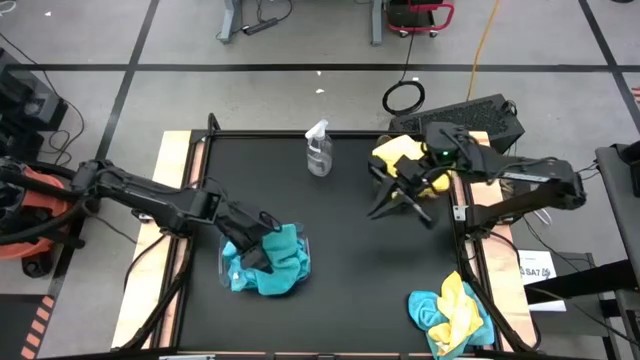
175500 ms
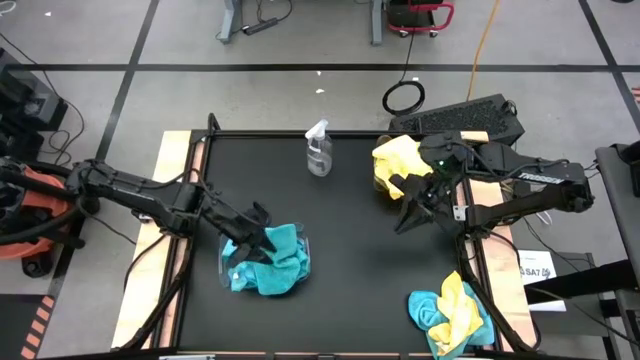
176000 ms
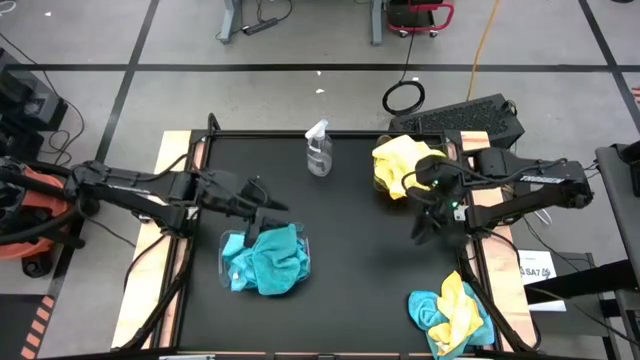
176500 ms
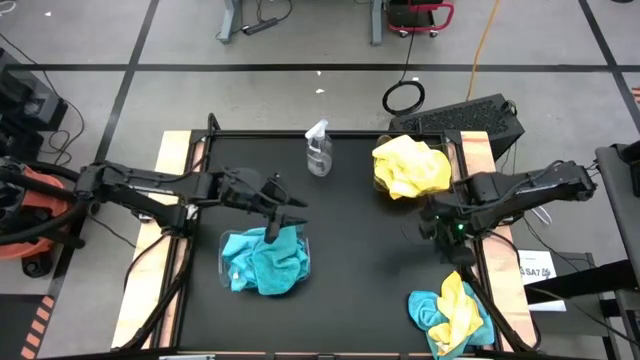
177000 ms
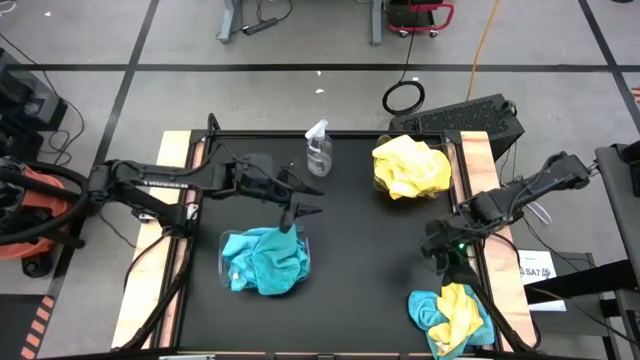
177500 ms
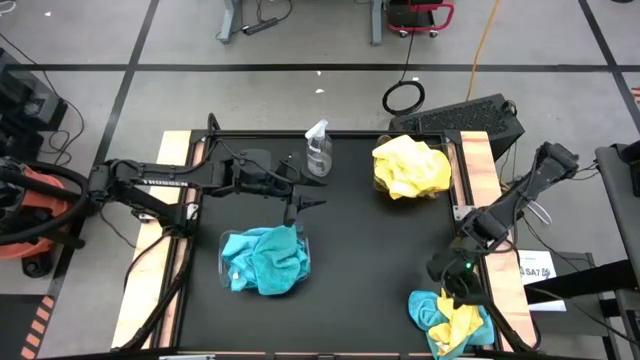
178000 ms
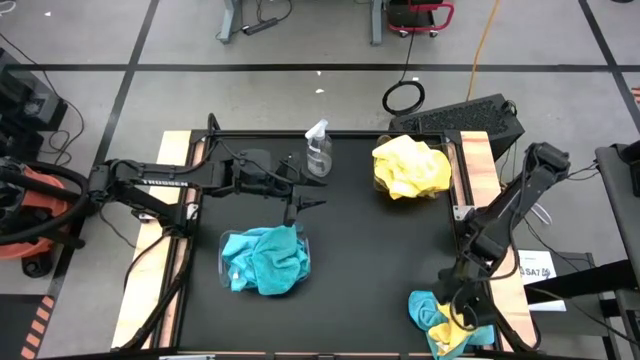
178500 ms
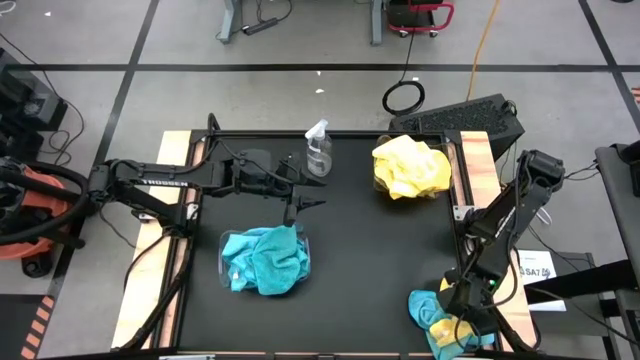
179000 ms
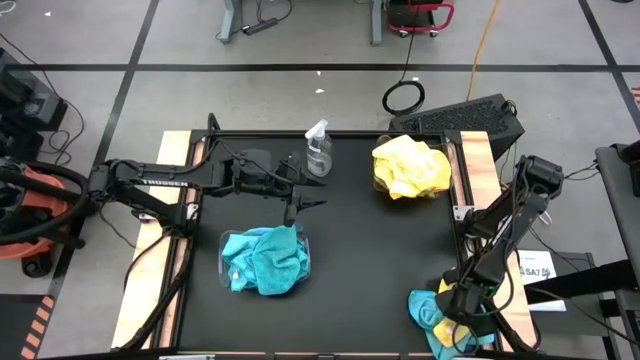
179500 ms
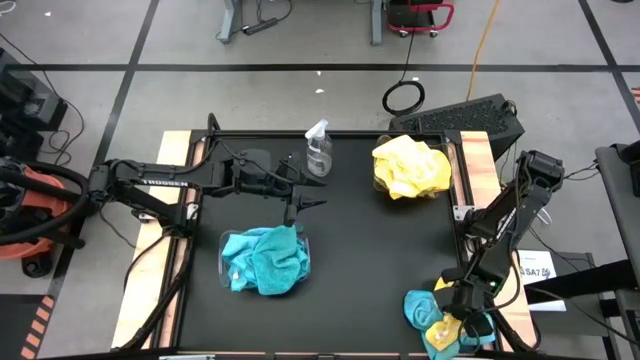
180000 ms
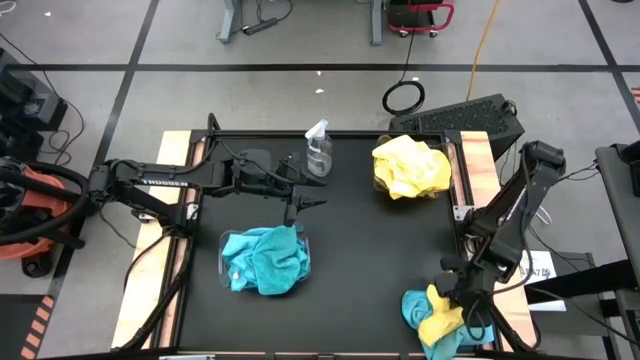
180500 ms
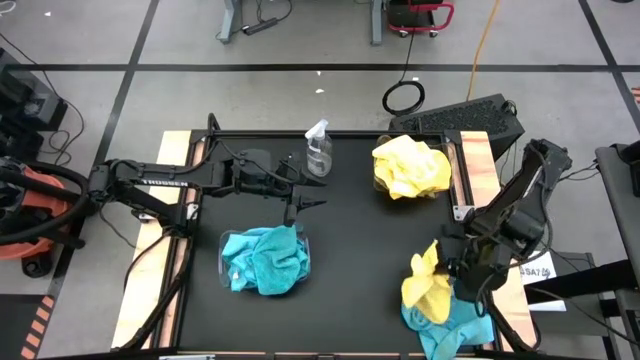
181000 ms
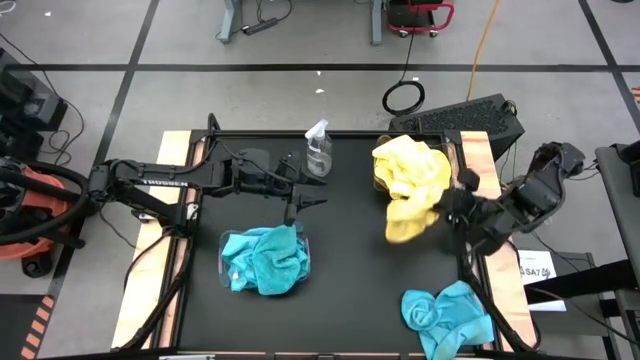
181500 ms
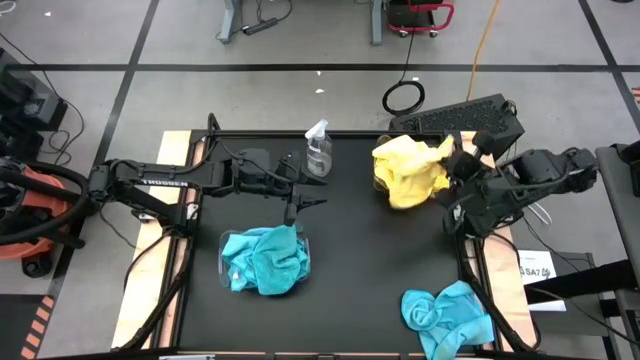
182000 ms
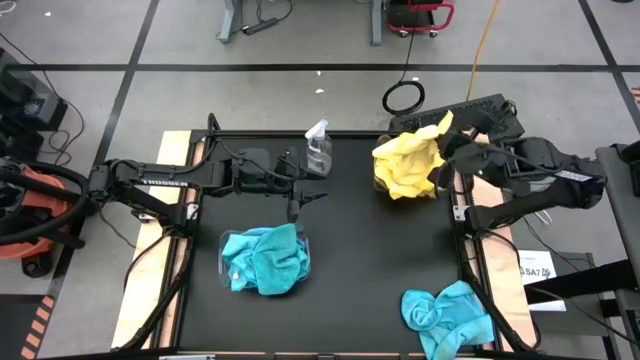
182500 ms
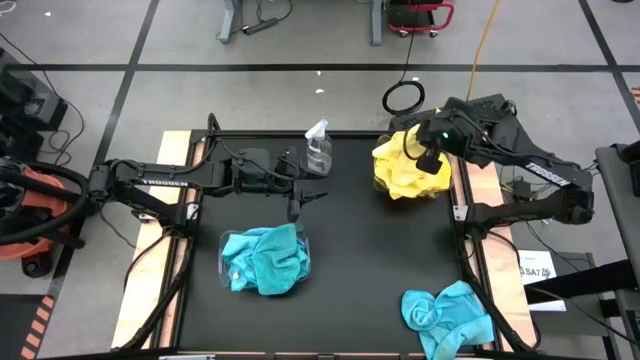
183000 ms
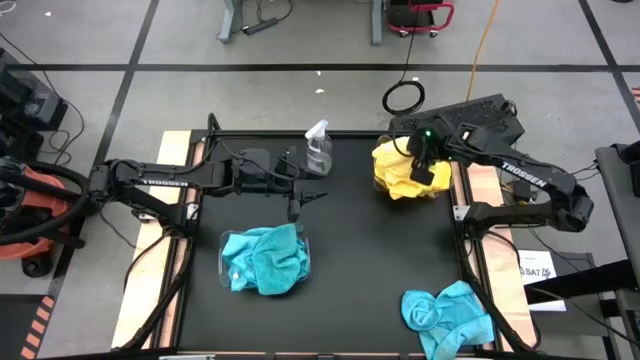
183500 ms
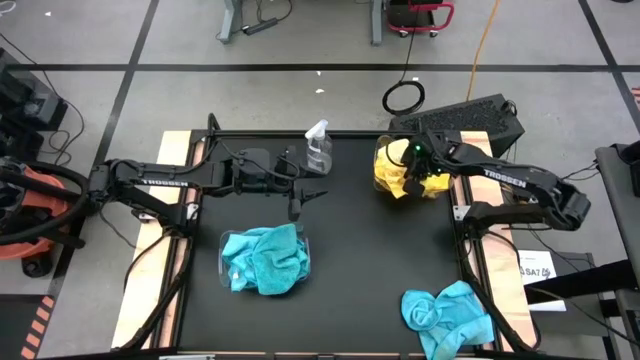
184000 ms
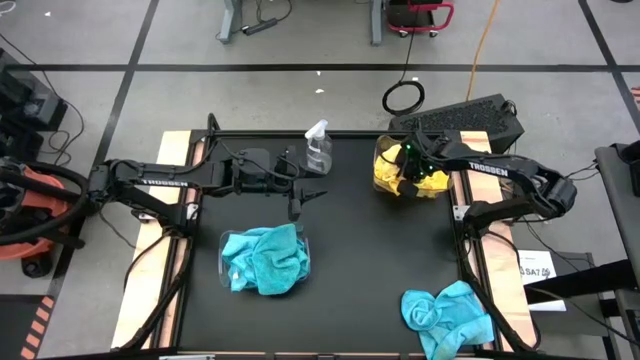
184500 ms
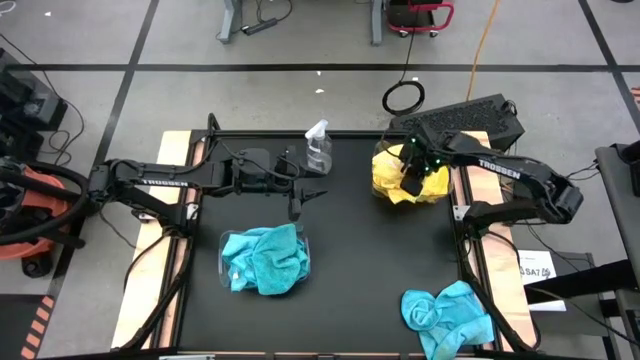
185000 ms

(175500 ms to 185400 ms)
Task: Sort microfiber towel by color & place in baskets
Put the yellow towel into the top transparent bin

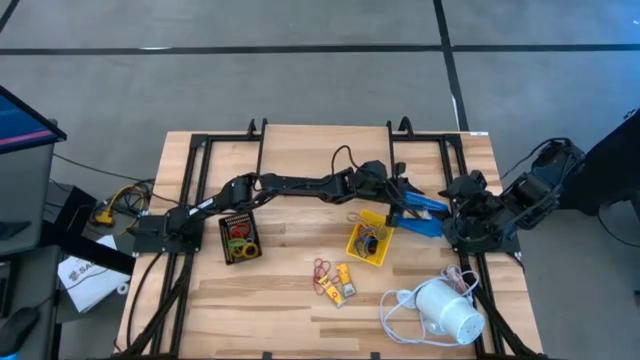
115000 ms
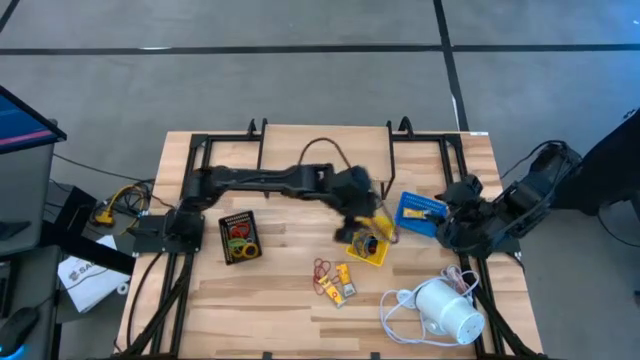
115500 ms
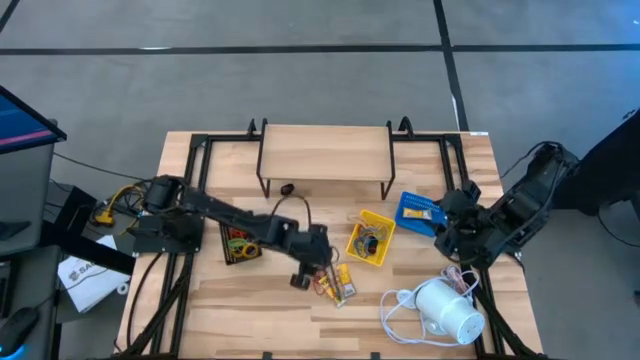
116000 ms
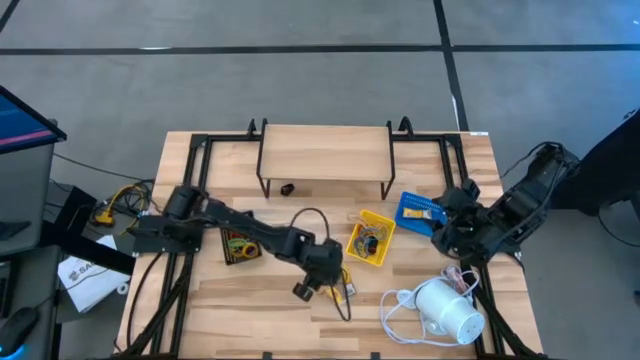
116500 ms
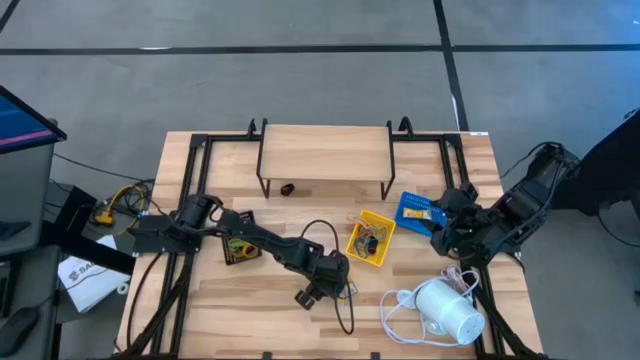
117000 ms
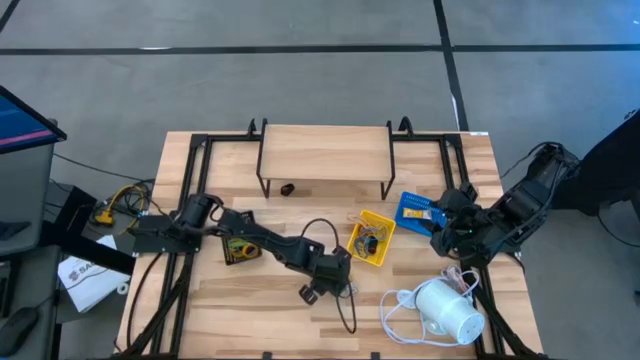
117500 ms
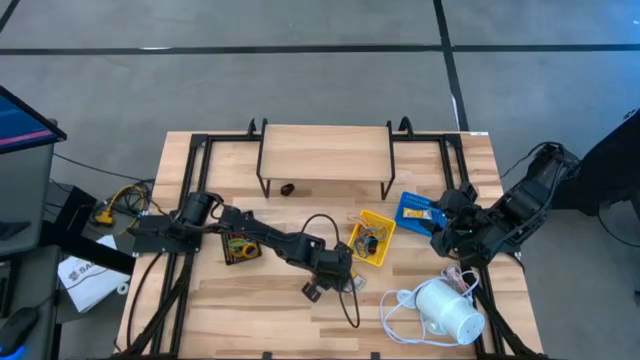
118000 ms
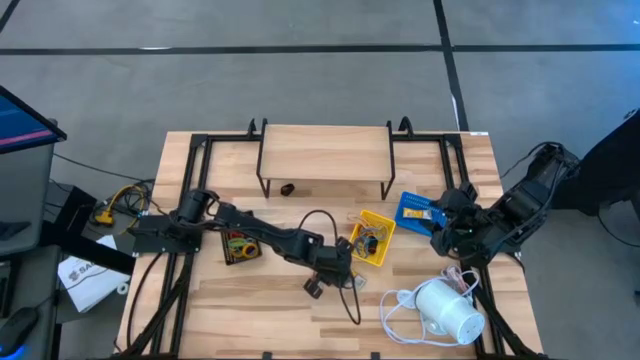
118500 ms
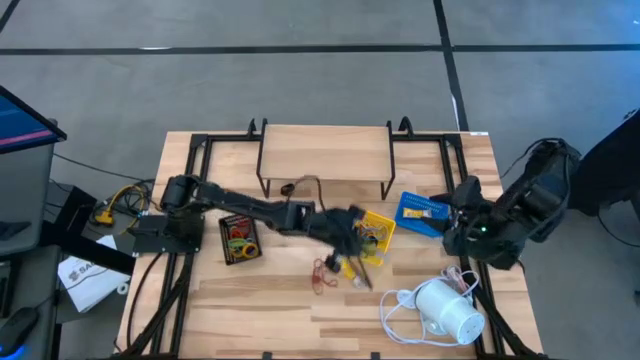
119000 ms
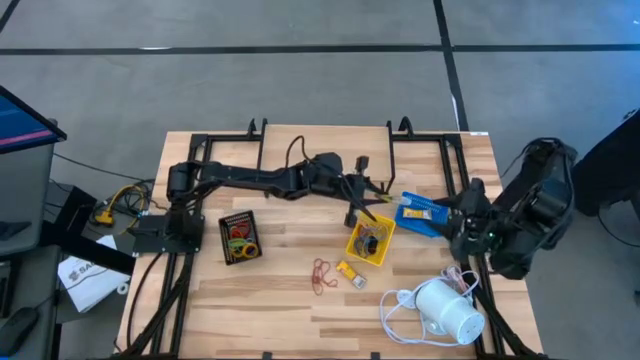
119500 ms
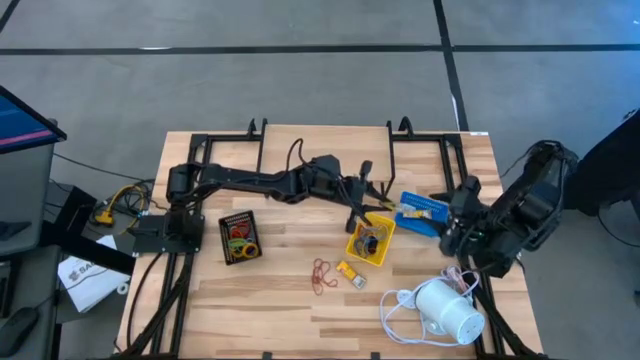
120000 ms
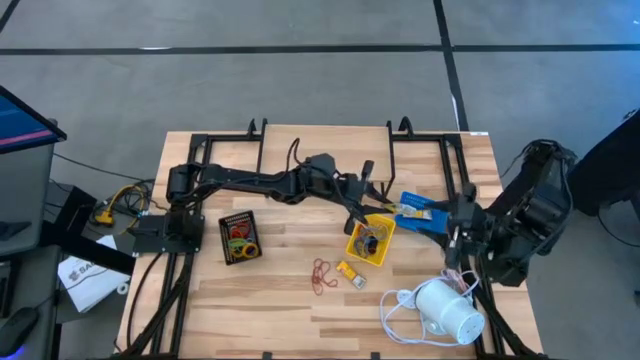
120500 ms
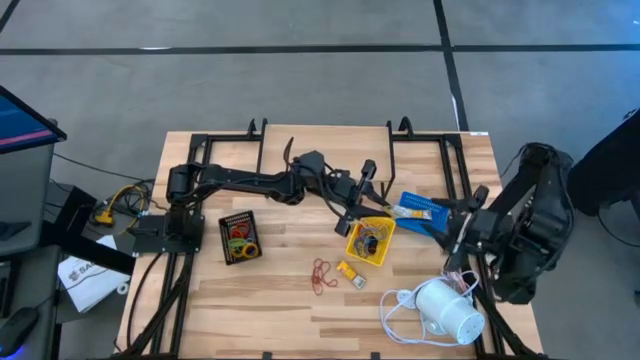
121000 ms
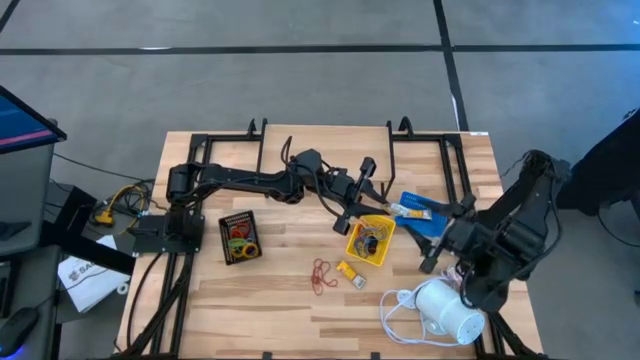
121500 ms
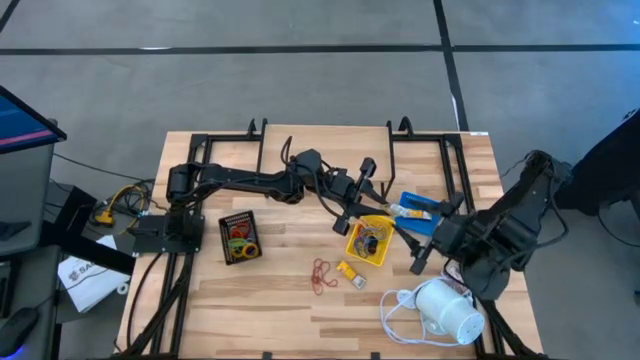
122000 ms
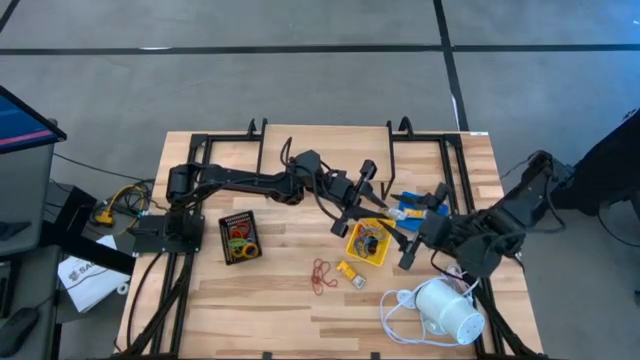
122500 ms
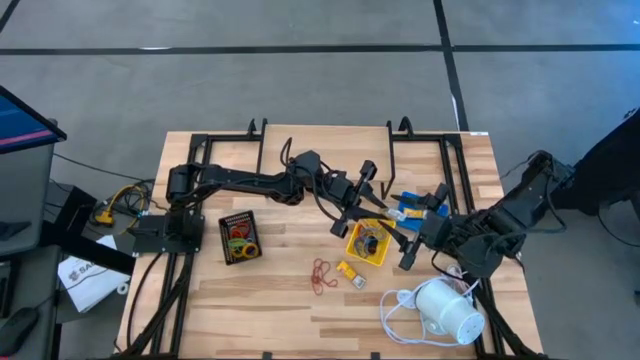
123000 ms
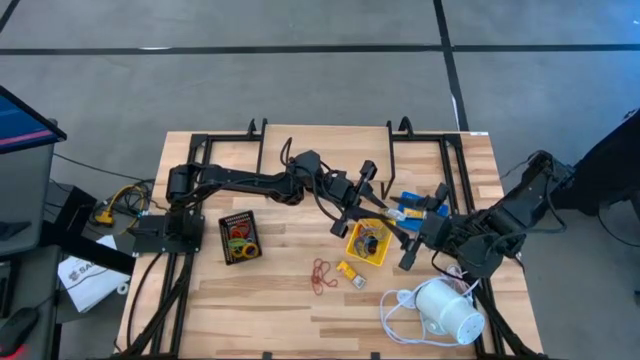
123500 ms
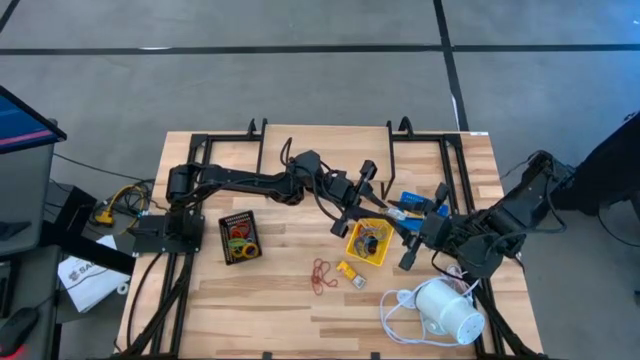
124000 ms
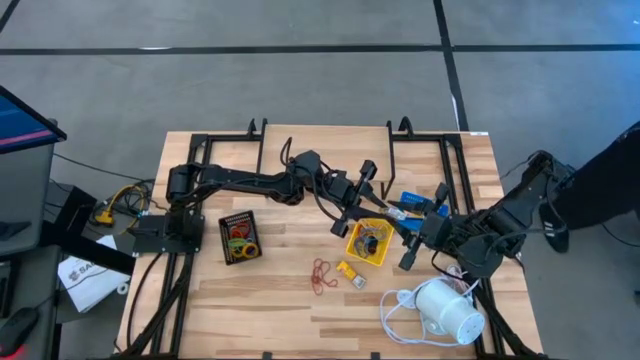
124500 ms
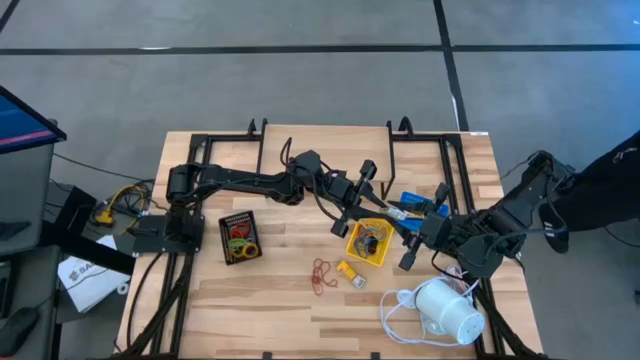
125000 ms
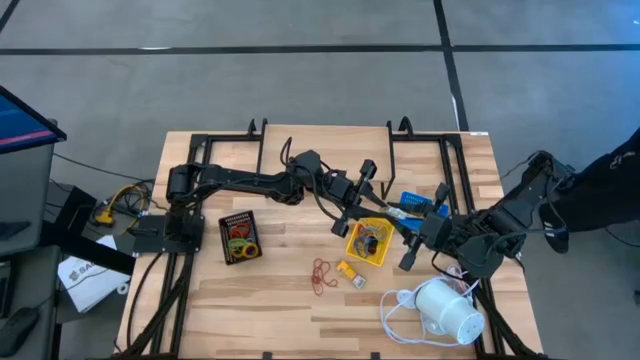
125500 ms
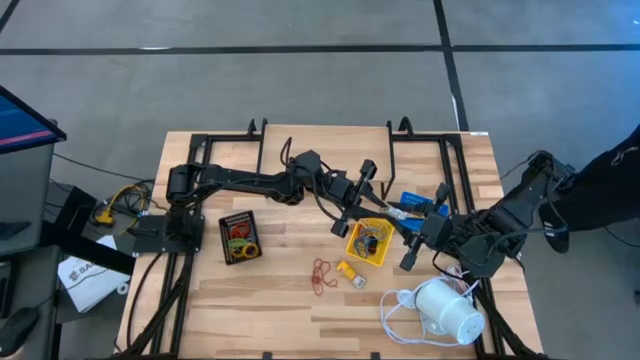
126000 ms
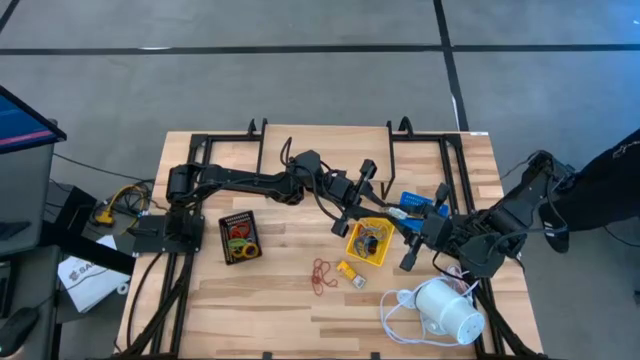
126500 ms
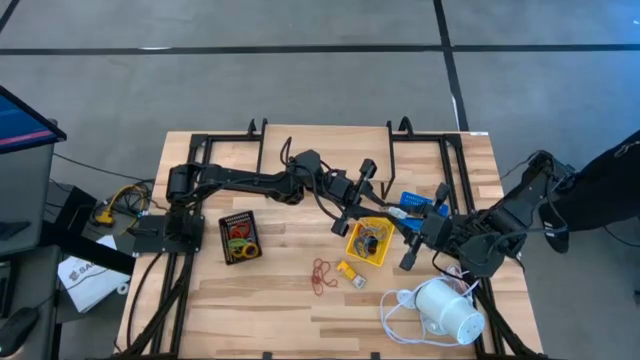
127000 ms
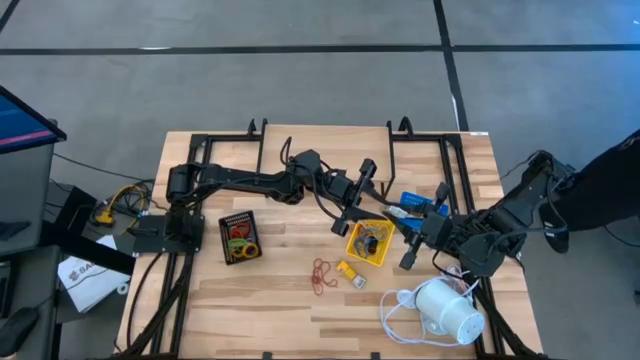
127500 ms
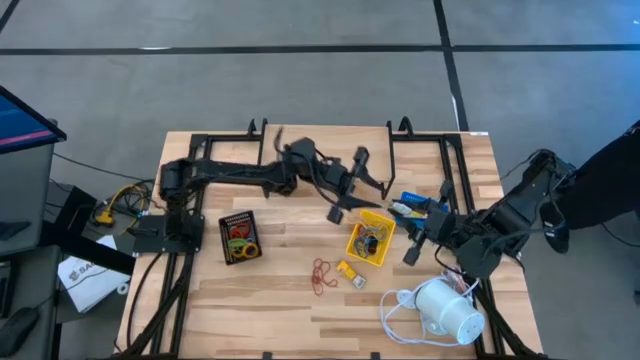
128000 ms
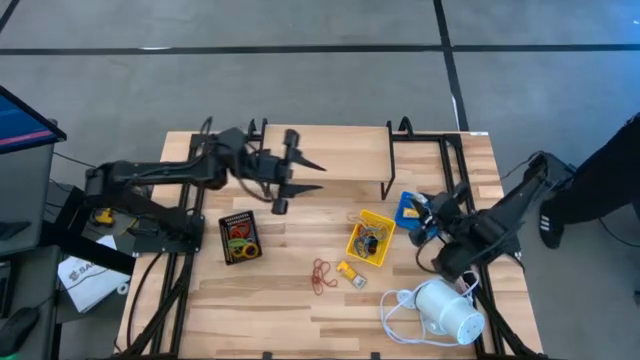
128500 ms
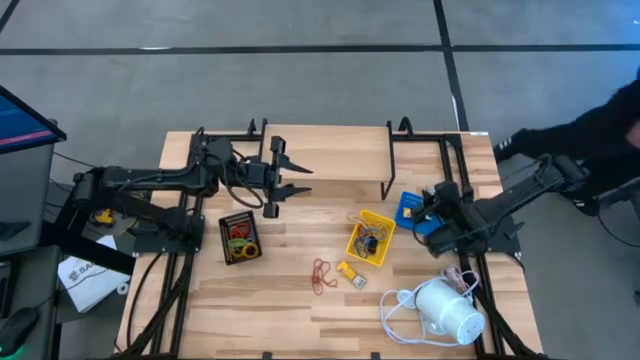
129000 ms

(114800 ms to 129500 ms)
Task: Pick & Place Office Desk Supplies
Put the yellow crayon box into the blue bin
